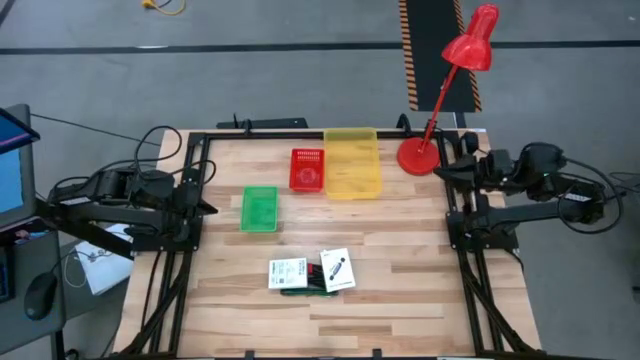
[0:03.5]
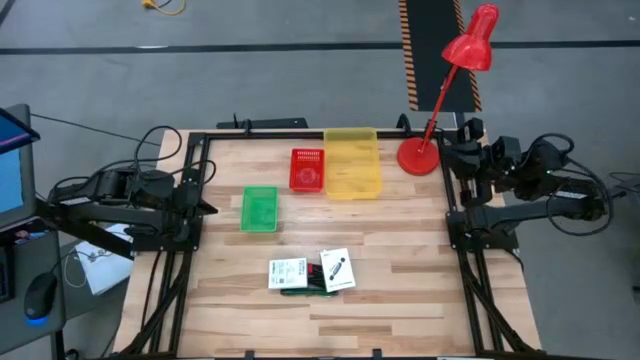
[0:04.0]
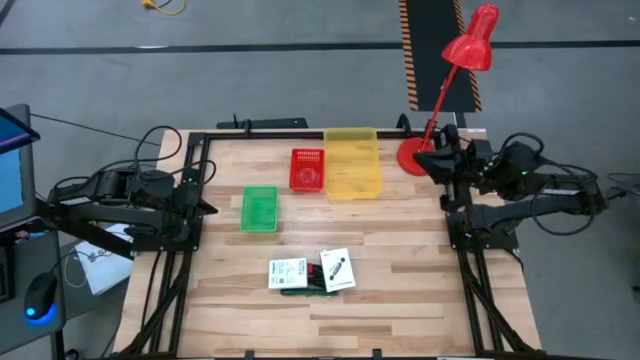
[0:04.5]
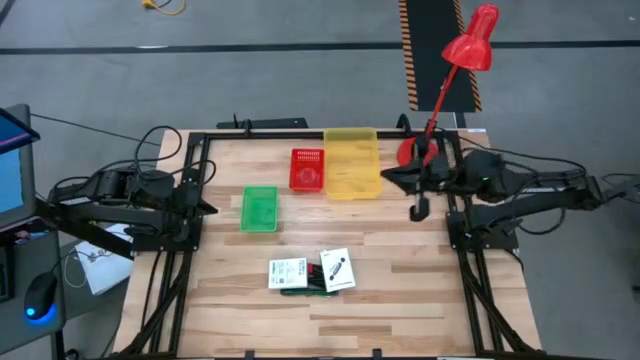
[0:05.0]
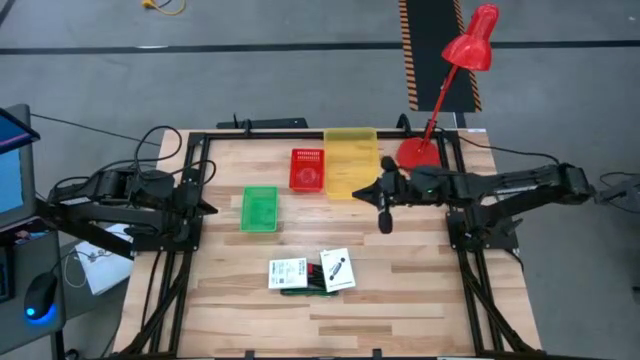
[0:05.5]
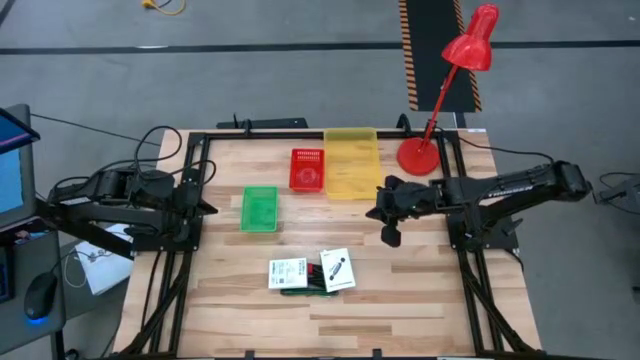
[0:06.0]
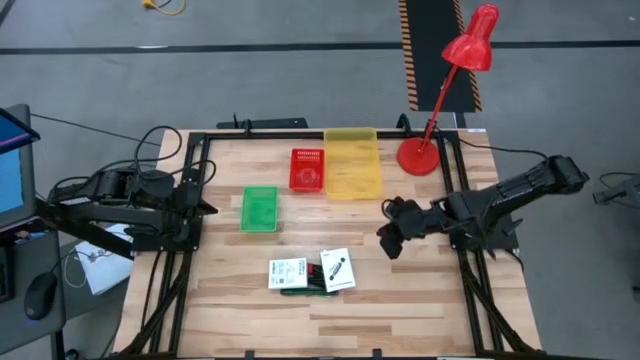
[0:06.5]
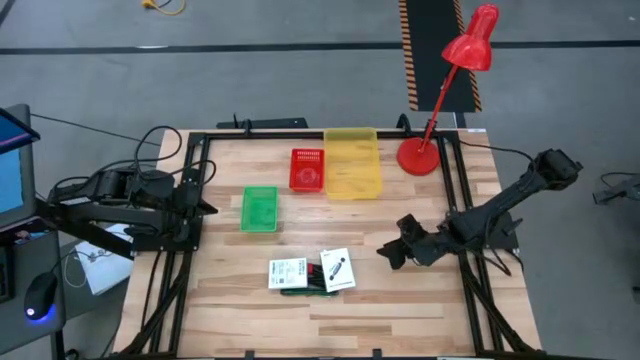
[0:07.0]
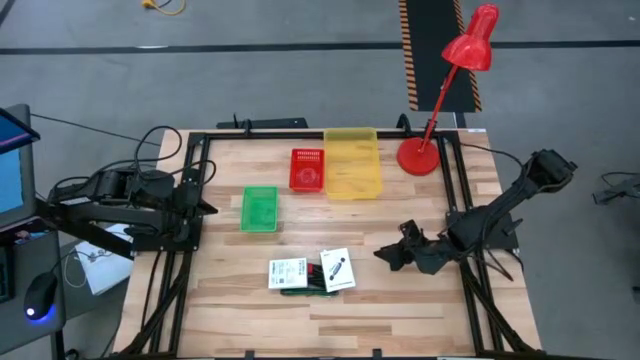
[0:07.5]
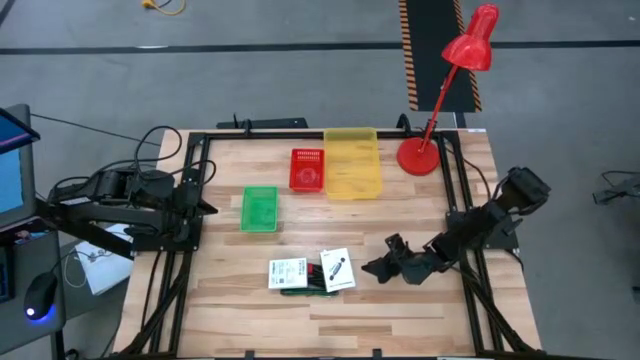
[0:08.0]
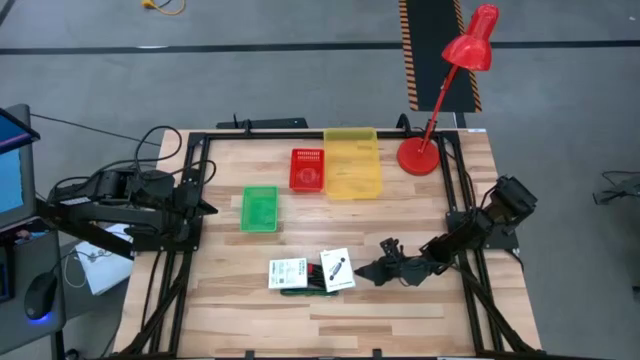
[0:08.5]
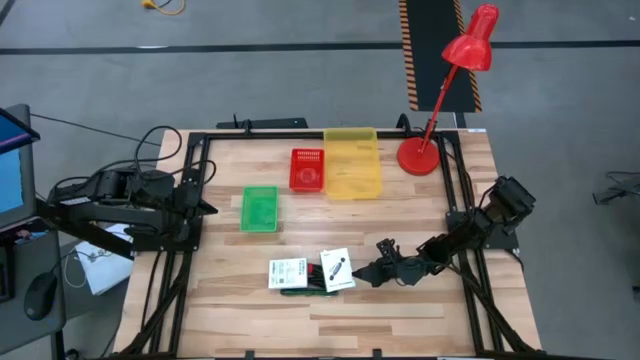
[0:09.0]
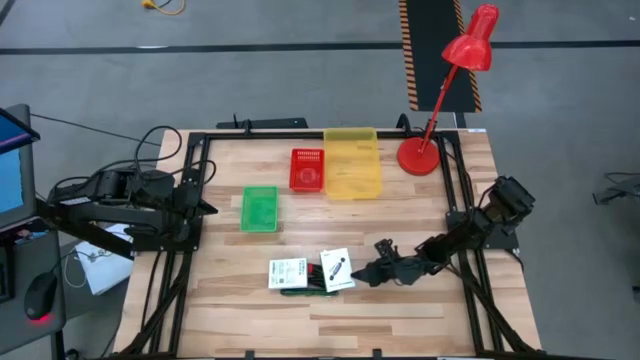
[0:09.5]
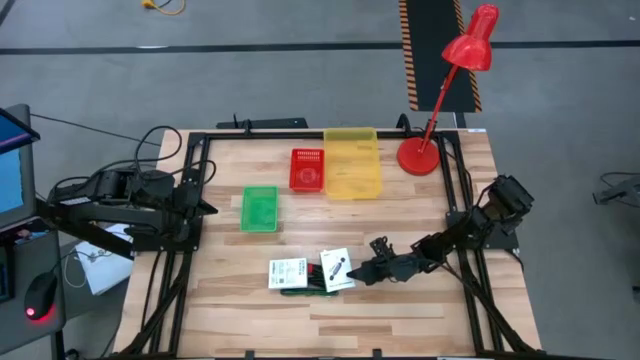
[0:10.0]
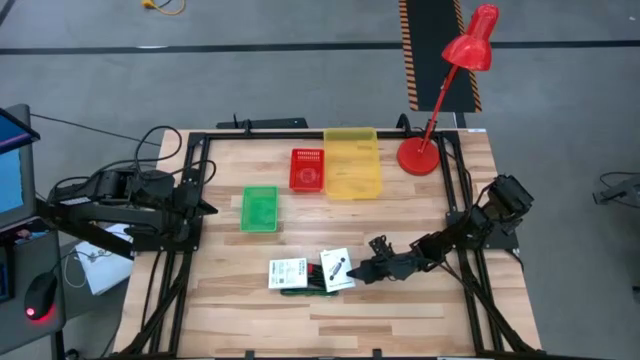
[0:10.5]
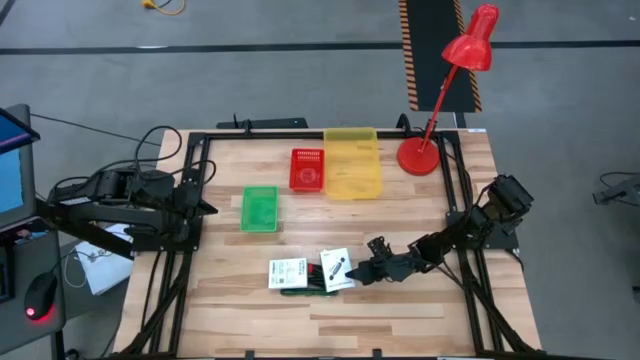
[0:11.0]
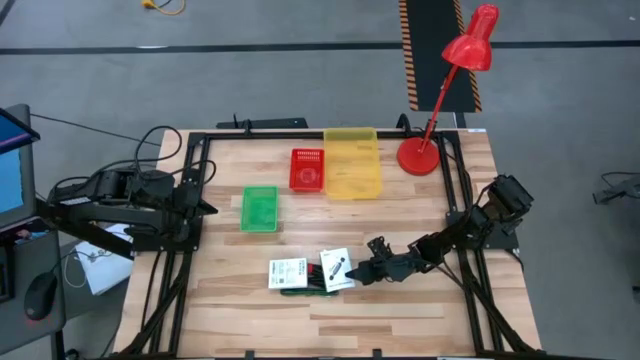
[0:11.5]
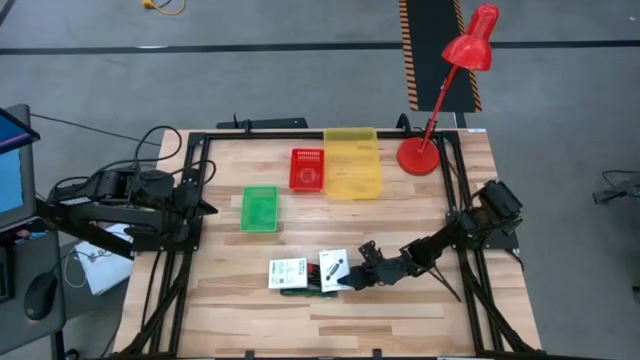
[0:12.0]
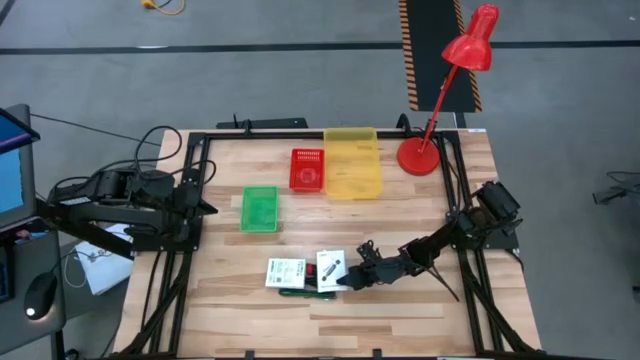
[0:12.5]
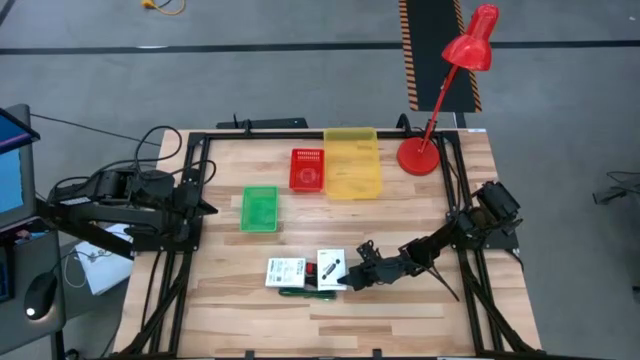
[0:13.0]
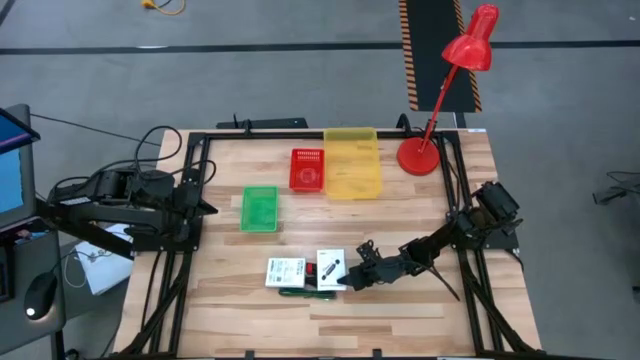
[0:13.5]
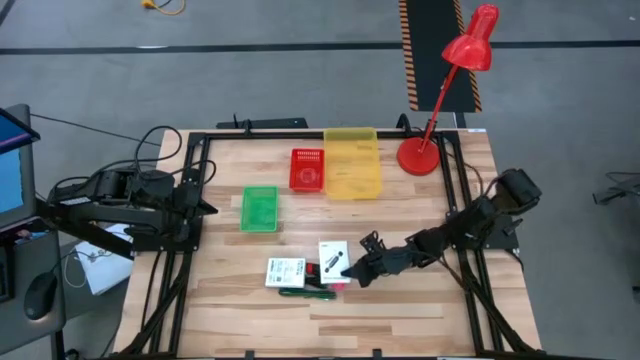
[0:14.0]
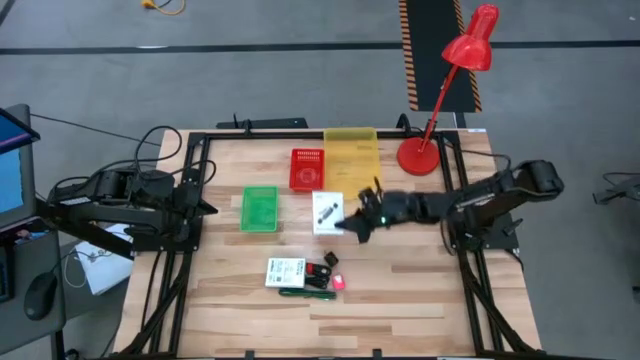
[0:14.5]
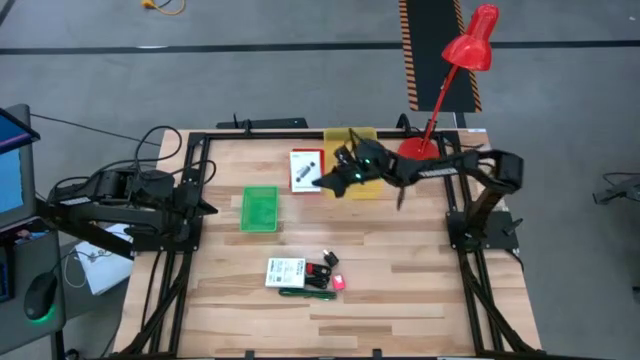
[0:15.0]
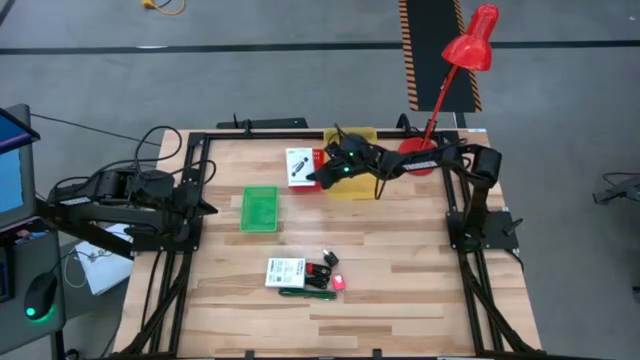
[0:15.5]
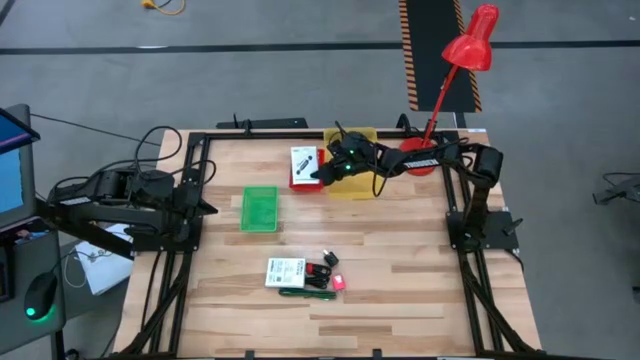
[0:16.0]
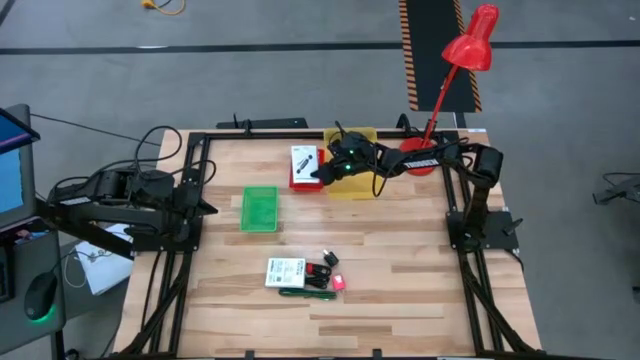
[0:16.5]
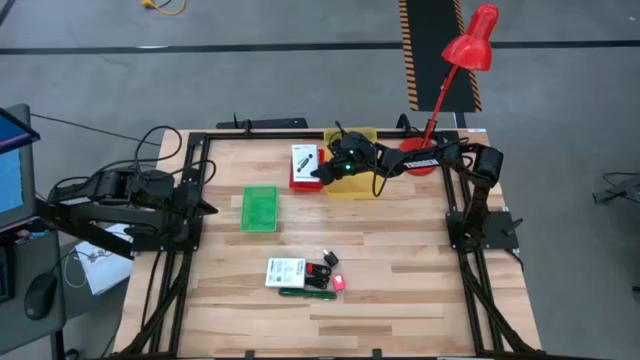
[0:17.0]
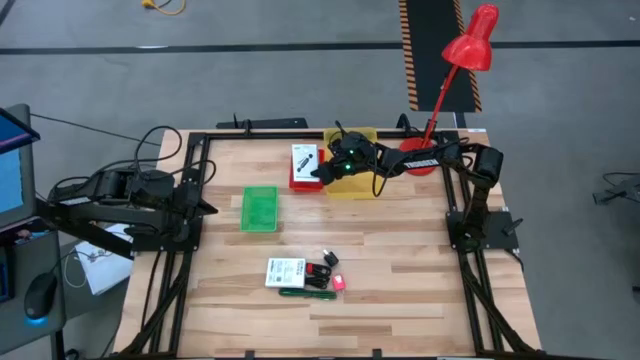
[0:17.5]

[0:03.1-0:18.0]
Task: Pick and place items into bin
Put the card reader box into the red bin

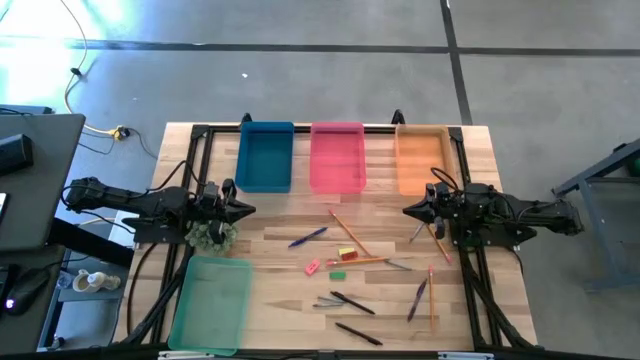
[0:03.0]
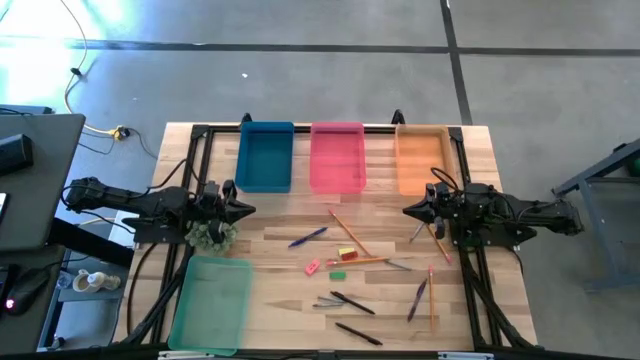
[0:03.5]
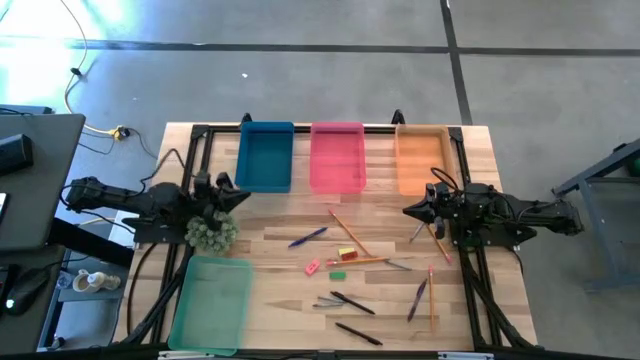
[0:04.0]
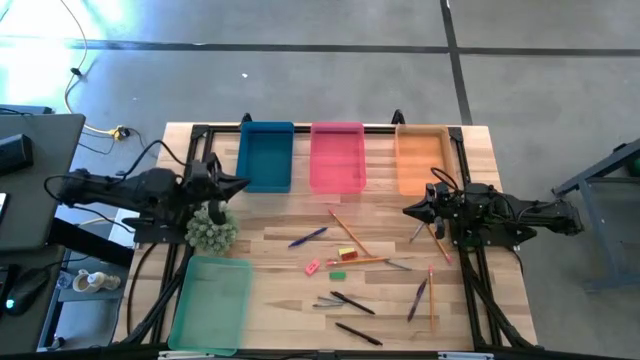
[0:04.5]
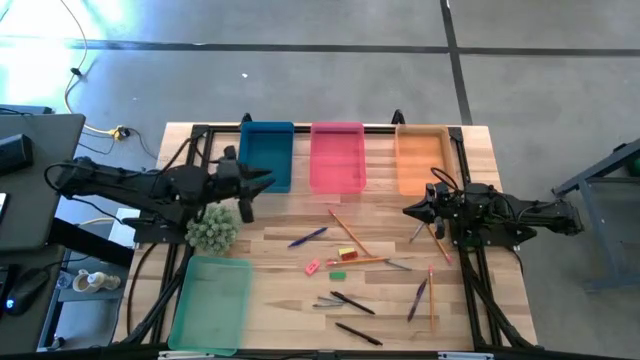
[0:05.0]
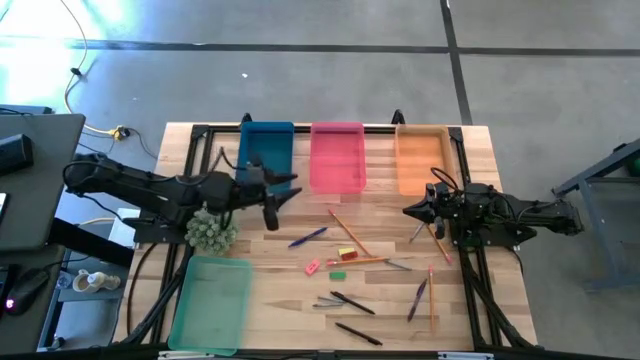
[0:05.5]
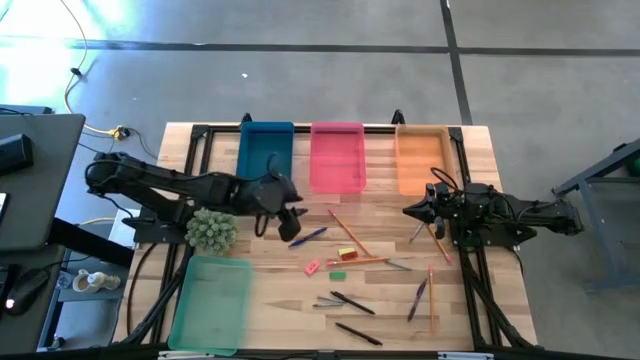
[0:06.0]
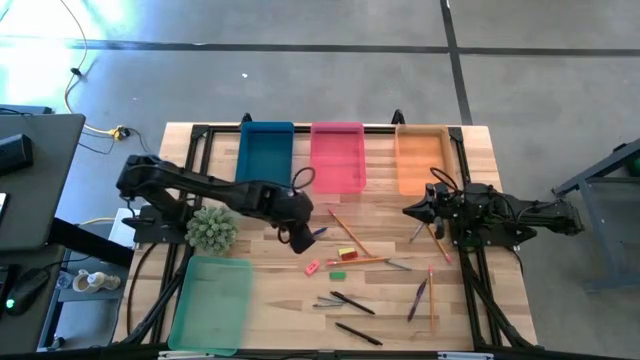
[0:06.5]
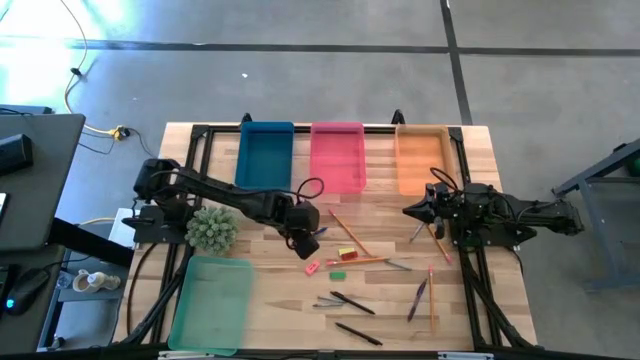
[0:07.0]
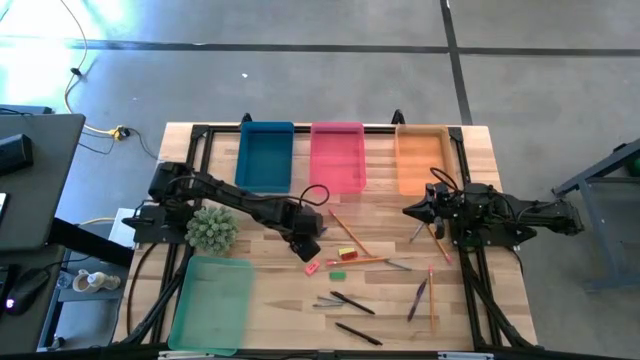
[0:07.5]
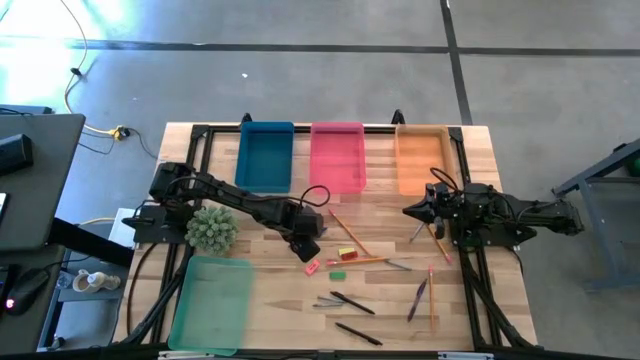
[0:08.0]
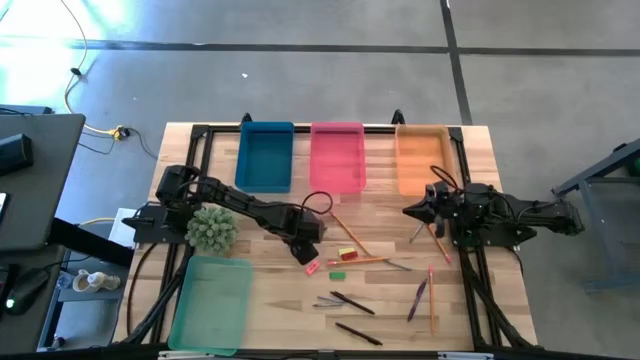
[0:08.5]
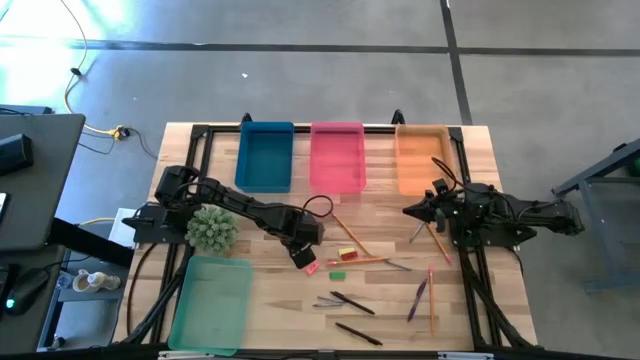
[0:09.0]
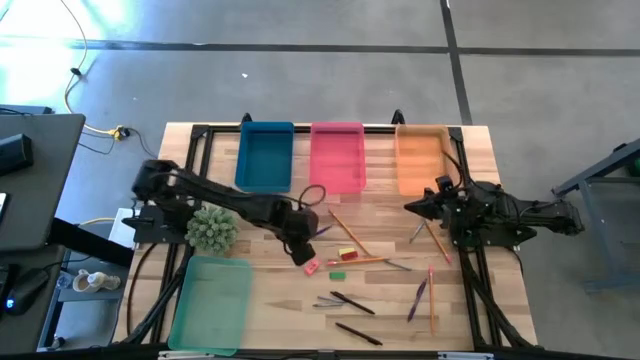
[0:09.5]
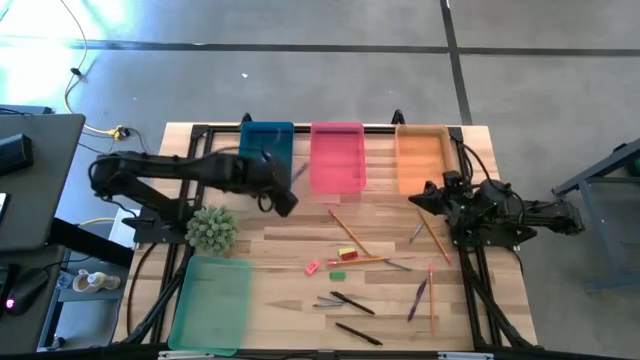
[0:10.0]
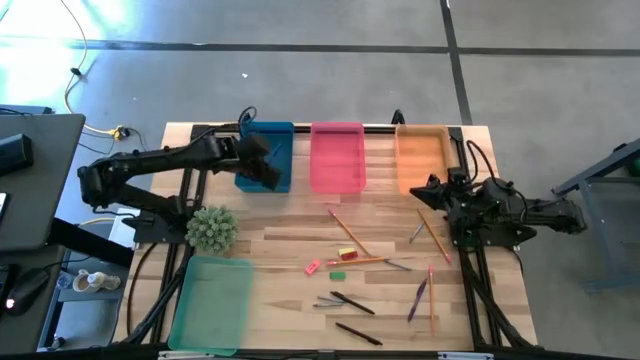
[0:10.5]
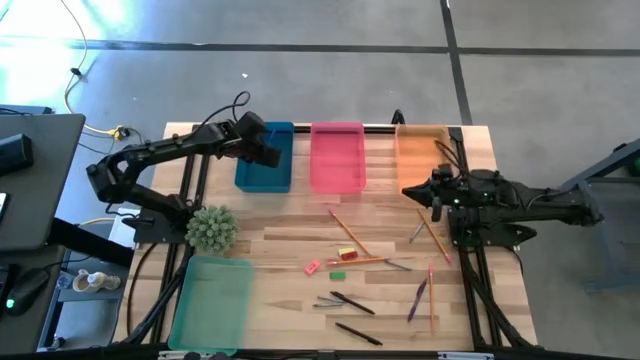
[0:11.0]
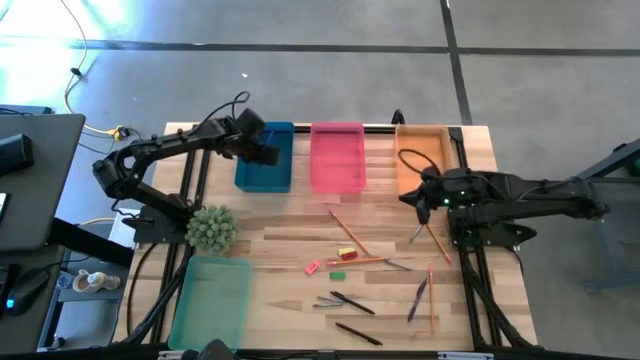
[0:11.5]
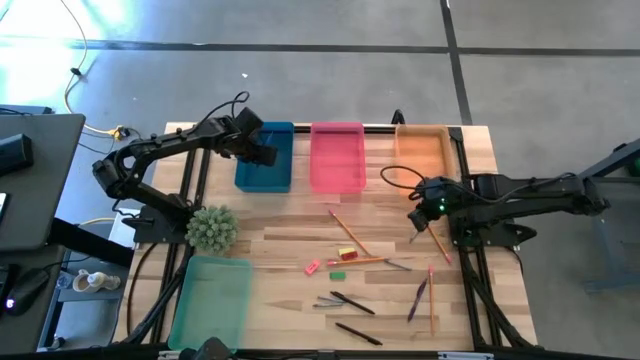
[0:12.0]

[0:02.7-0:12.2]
Task: Sort crayons/erasers/pens/pencils in bins
Put the blue pen into the blue bin
